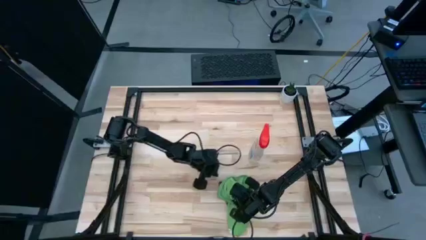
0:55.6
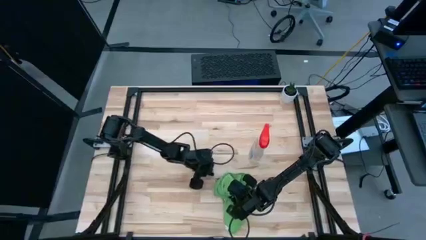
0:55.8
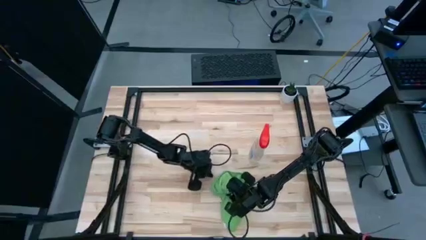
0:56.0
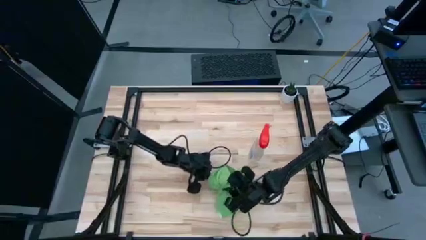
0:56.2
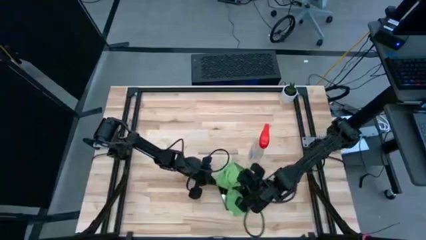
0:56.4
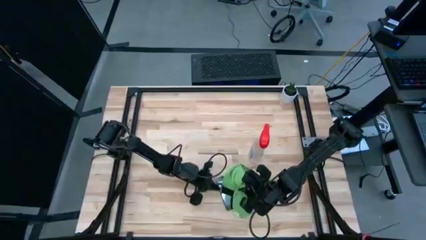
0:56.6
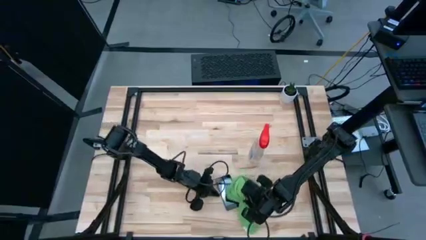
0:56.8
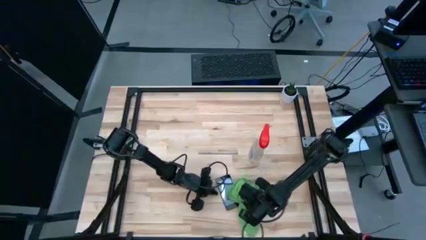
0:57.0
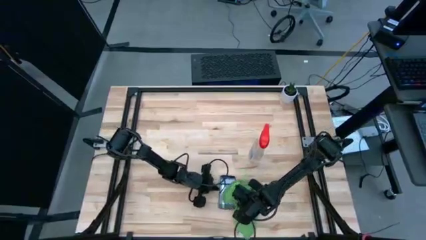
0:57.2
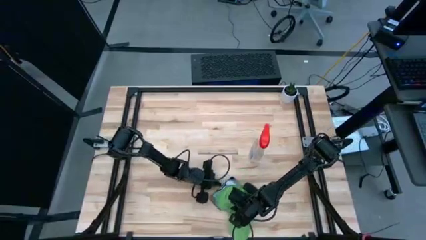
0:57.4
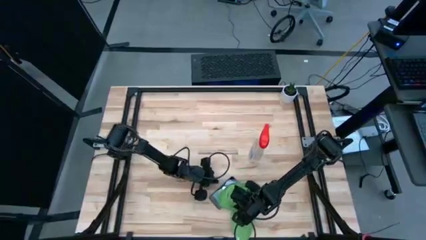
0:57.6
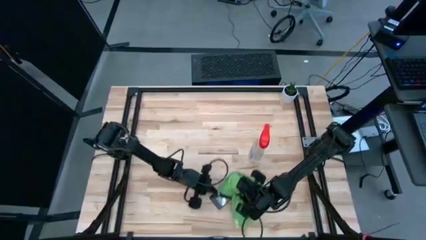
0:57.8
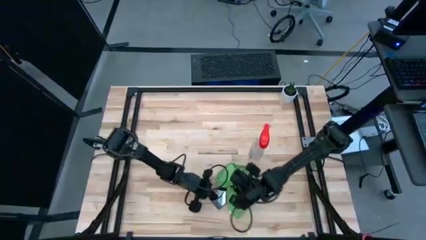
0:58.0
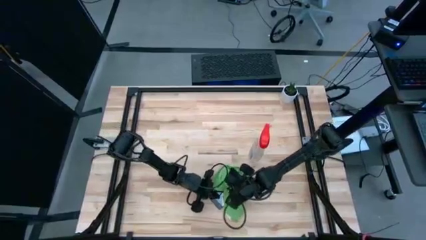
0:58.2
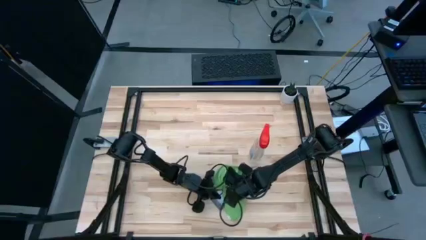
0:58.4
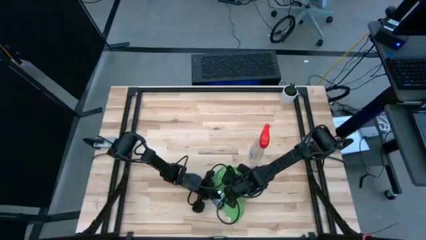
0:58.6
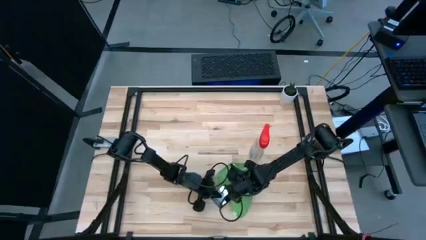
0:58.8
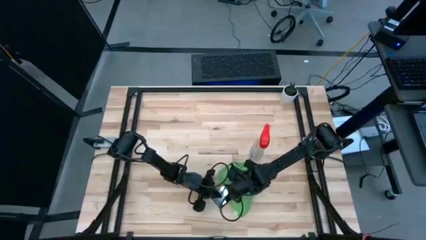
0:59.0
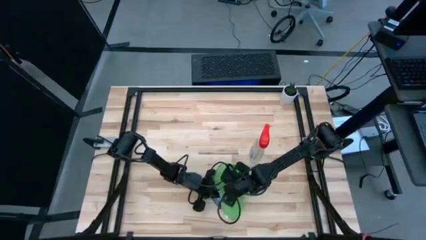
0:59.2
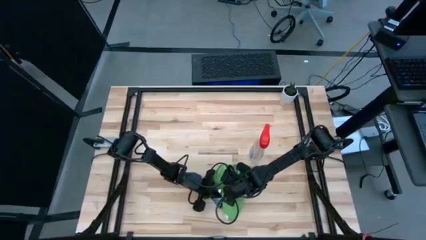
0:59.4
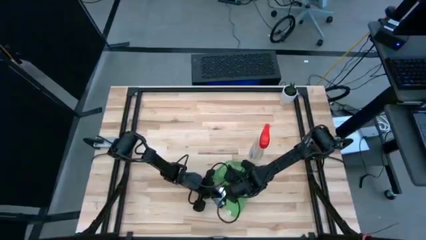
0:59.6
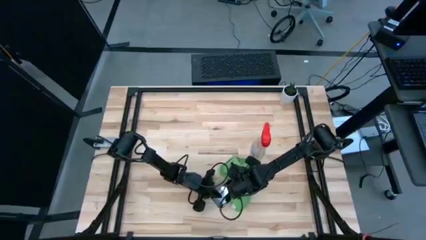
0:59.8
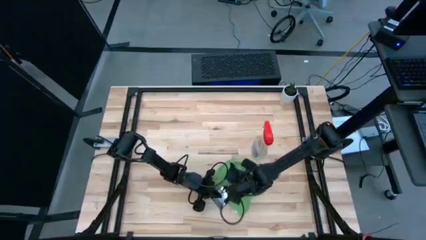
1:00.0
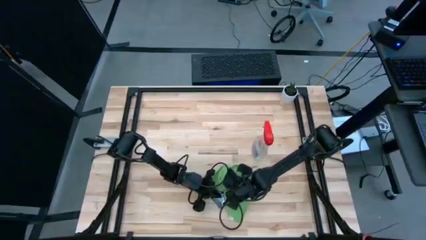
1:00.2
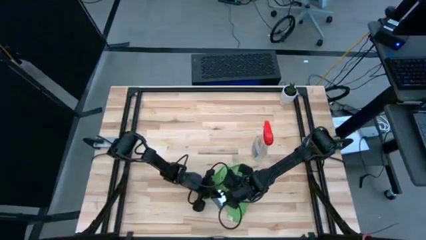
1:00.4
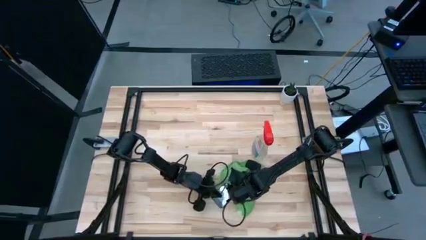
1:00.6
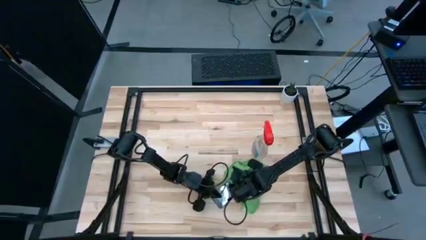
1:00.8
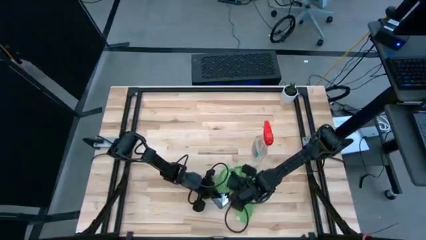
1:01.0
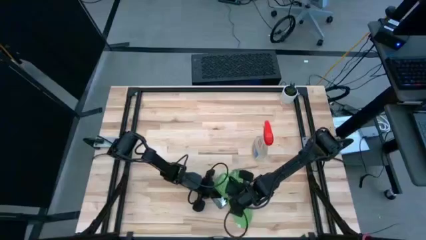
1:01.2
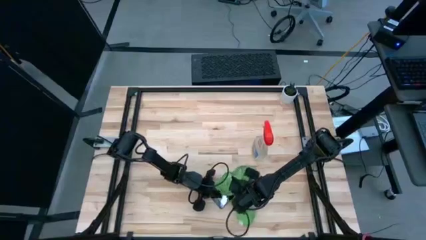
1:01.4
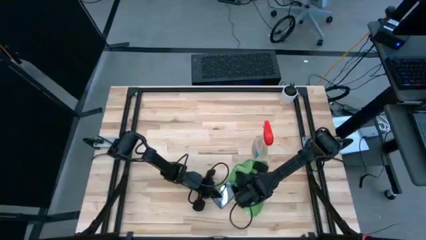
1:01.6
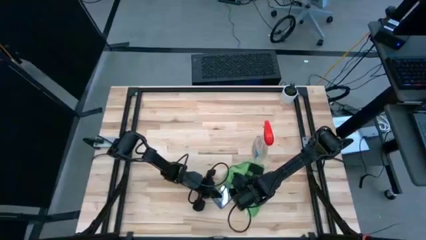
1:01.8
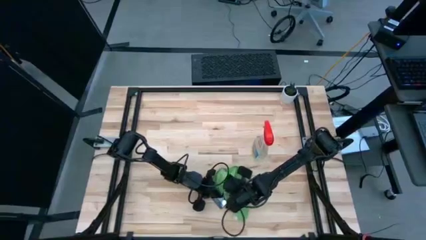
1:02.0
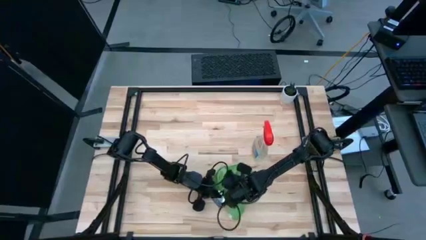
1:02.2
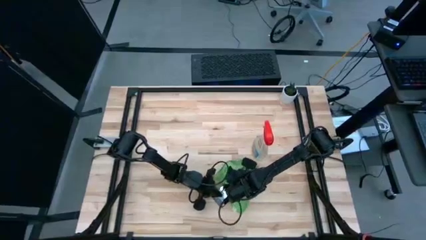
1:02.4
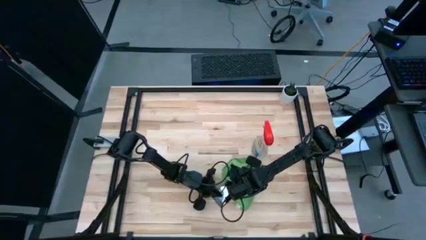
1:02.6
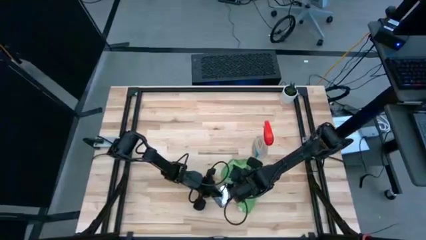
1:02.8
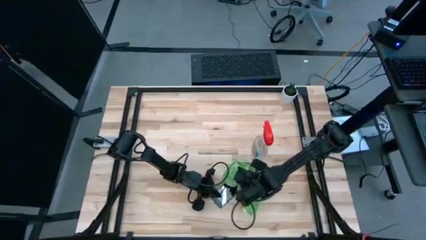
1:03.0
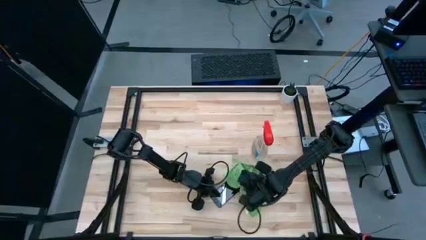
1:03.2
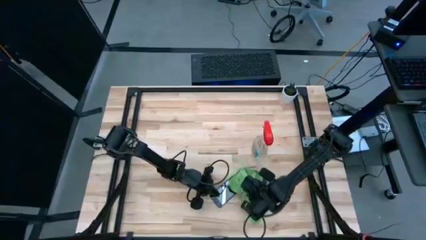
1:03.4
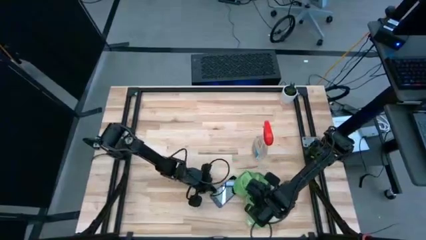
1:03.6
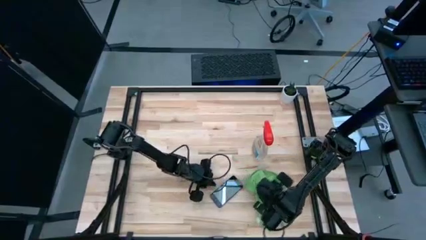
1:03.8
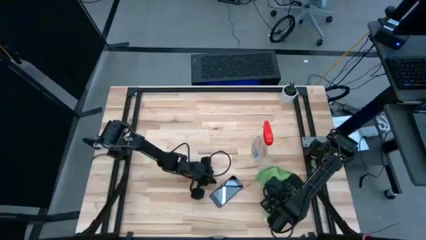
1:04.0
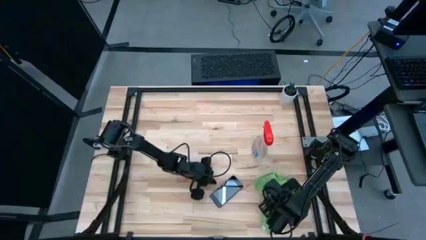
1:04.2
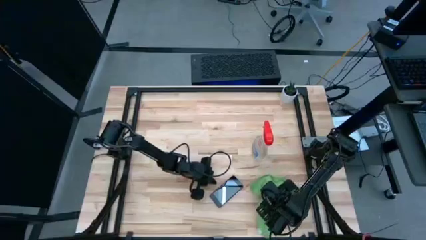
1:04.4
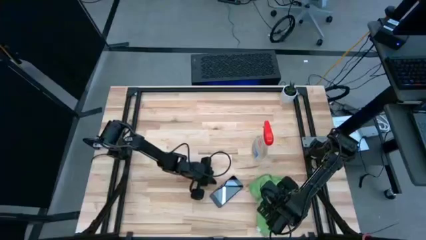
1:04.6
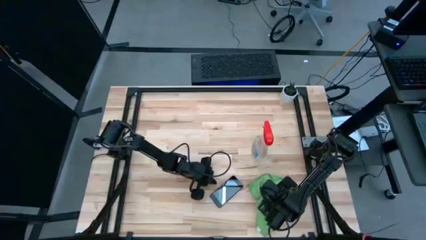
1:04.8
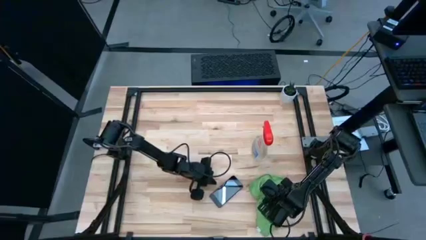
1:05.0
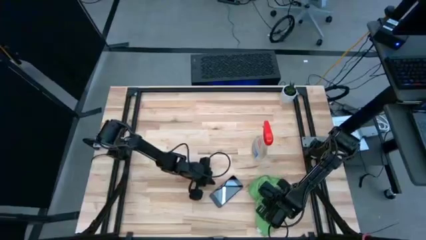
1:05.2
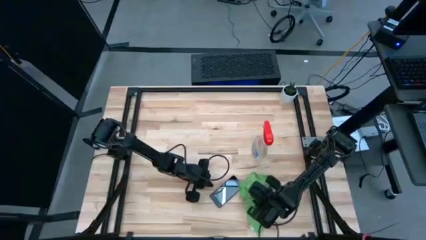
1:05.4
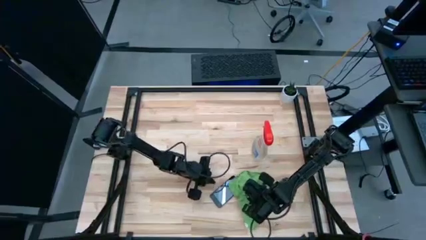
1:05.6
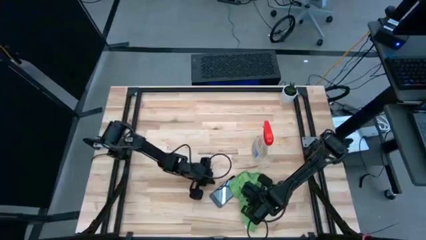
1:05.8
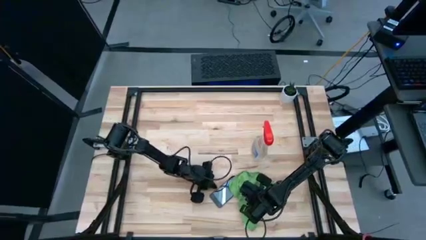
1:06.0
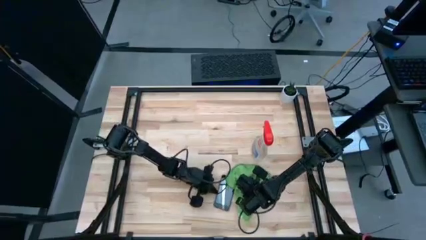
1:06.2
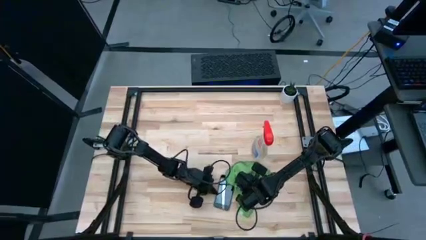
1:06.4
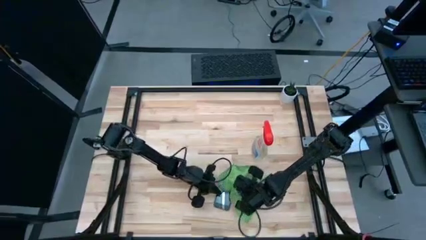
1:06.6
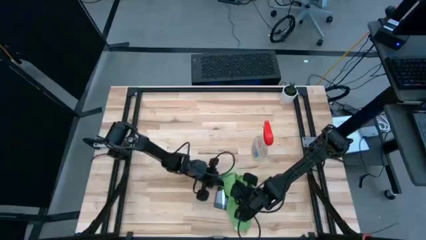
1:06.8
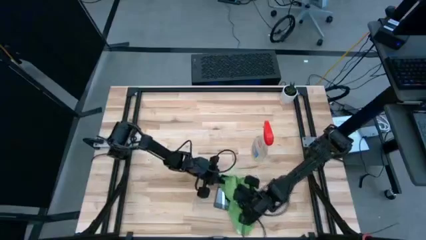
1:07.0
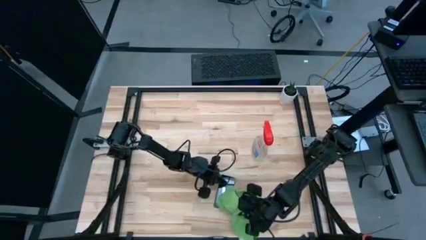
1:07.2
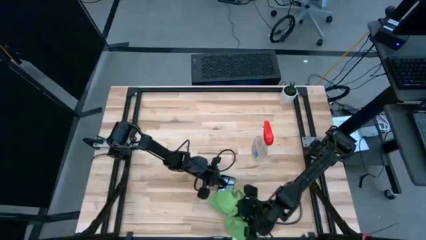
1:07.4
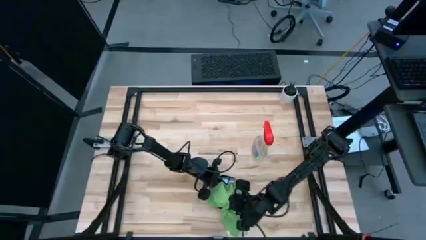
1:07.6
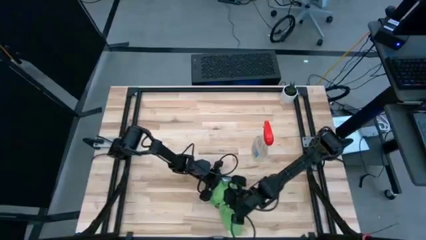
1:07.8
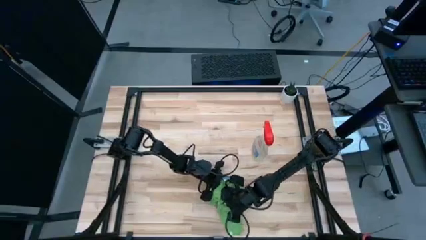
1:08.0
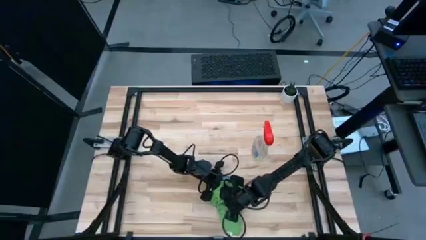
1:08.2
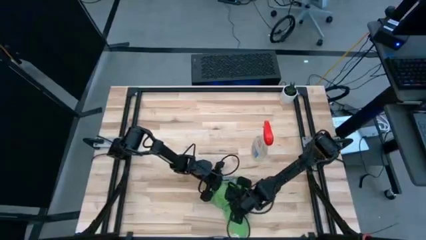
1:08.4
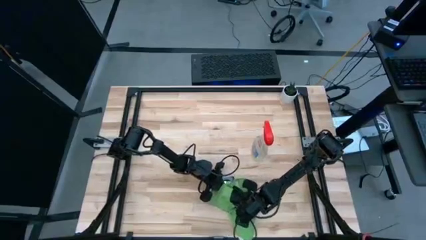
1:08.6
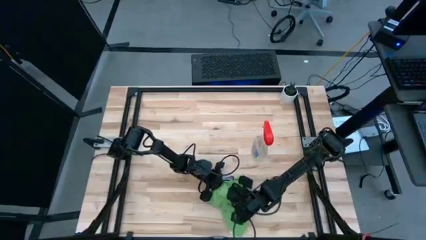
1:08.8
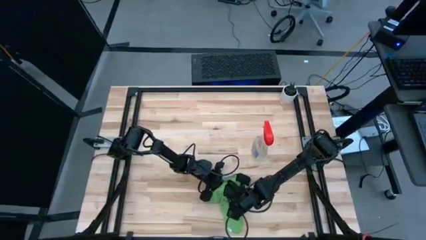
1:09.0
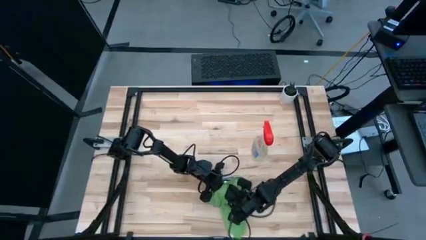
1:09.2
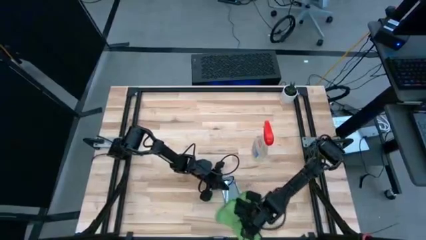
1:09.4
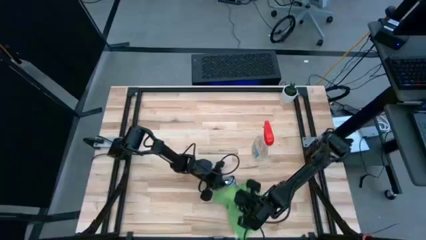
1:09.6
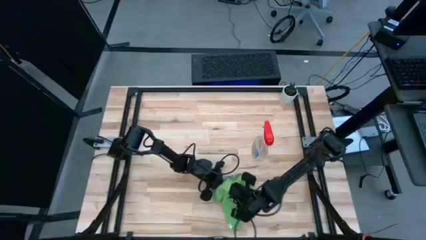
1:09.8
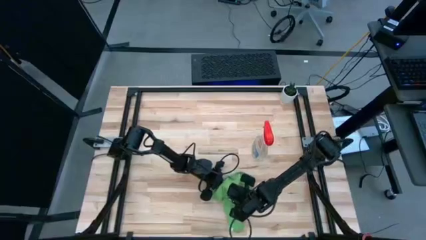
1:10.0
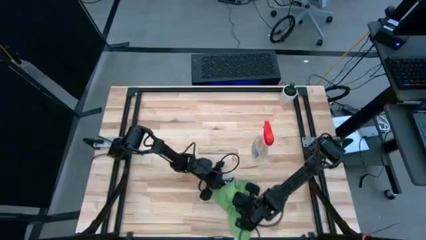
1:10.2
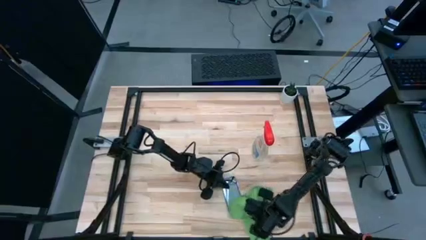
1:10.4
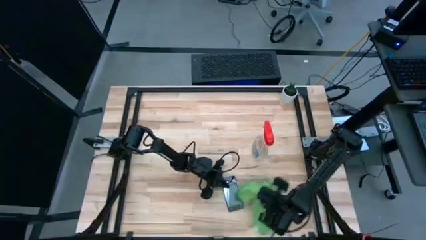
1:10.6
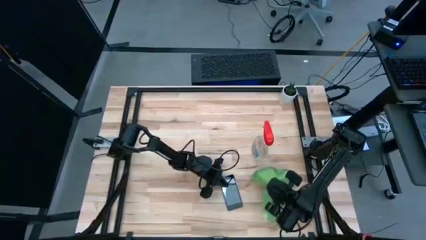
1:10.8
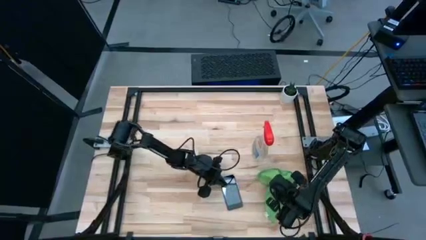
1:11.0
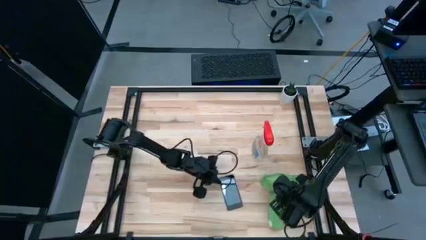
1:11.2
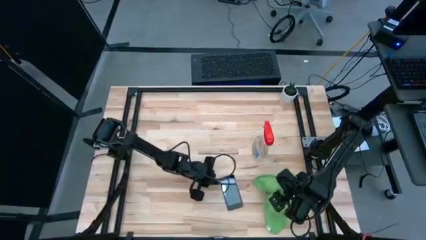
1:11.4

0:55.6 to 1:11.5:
Task: Apply microfiber cloth
Wipe the front of the cellphone with the green microfiber cloth
